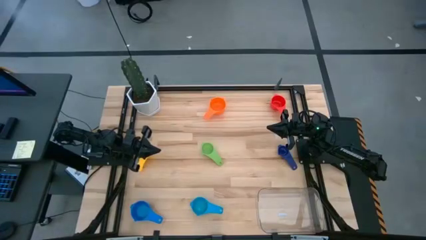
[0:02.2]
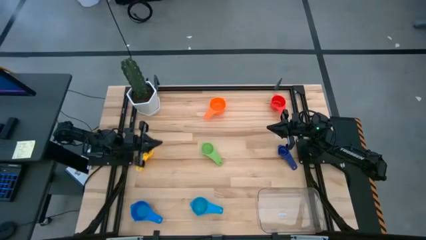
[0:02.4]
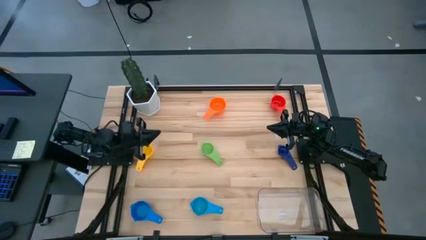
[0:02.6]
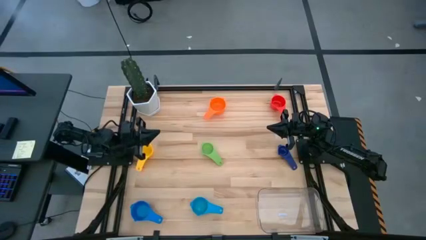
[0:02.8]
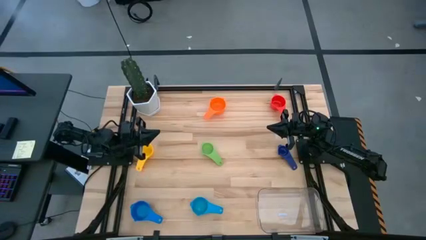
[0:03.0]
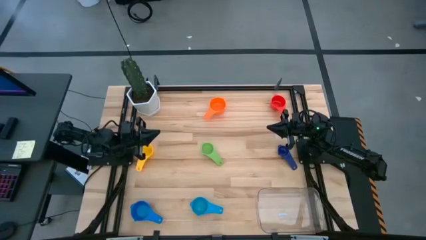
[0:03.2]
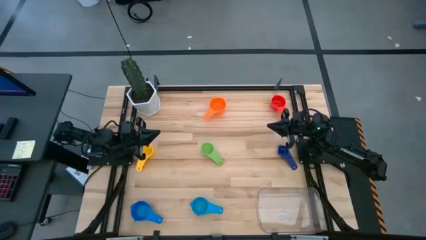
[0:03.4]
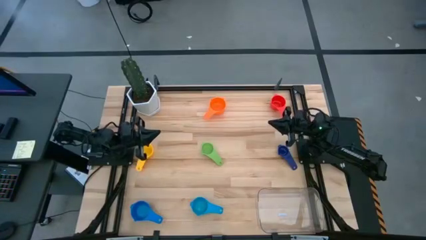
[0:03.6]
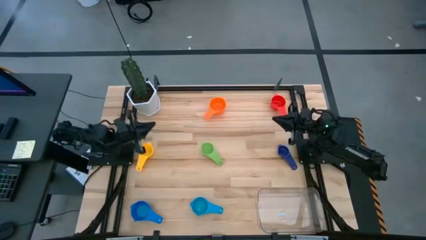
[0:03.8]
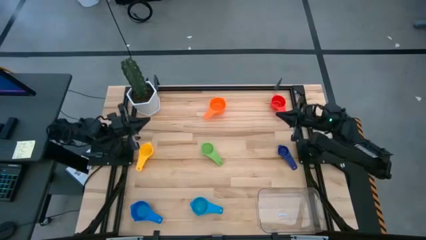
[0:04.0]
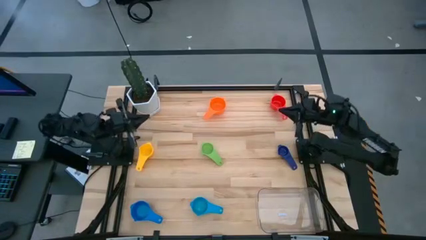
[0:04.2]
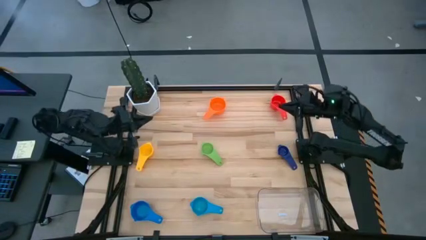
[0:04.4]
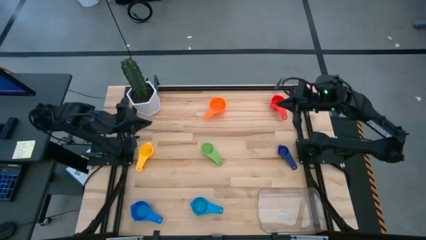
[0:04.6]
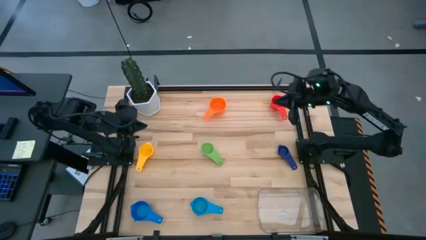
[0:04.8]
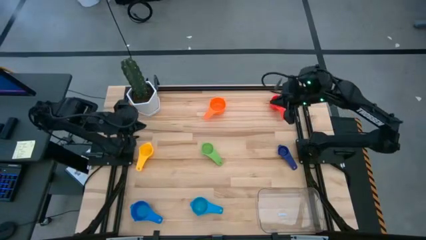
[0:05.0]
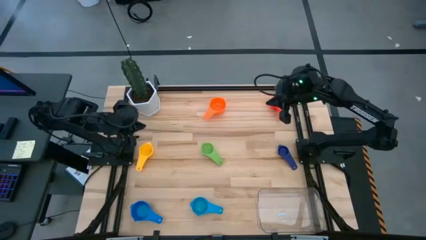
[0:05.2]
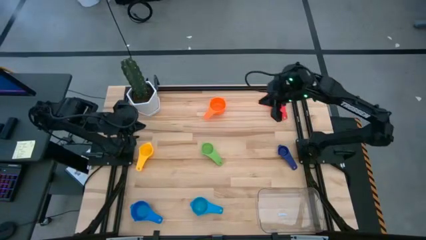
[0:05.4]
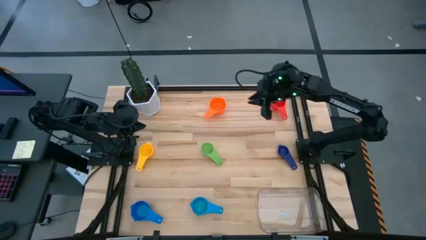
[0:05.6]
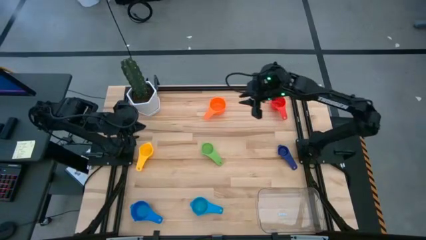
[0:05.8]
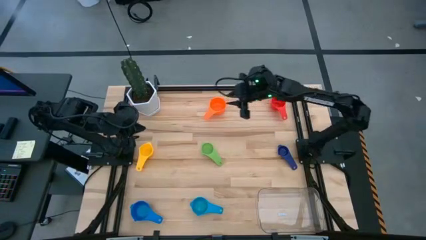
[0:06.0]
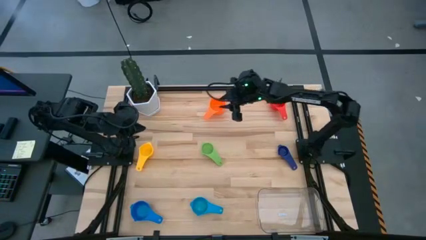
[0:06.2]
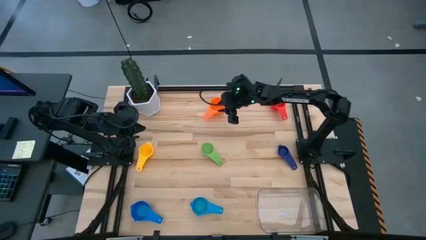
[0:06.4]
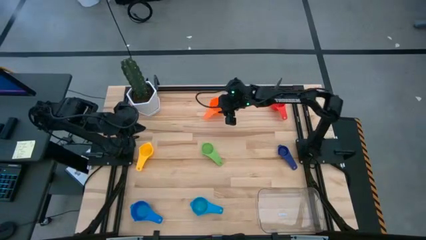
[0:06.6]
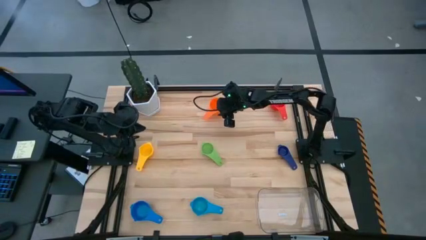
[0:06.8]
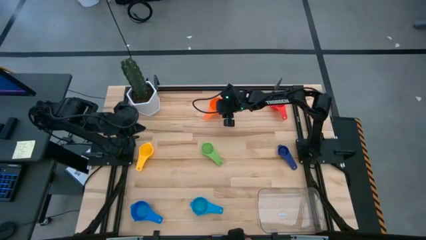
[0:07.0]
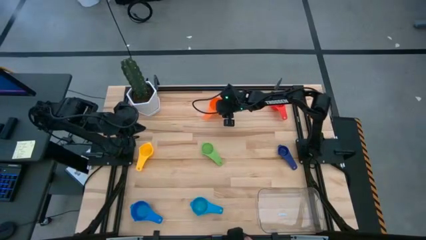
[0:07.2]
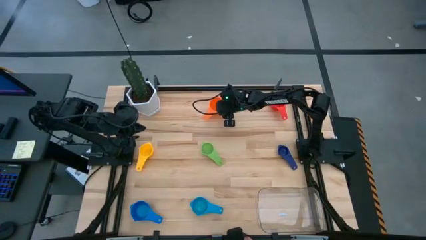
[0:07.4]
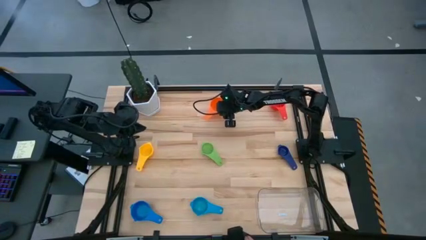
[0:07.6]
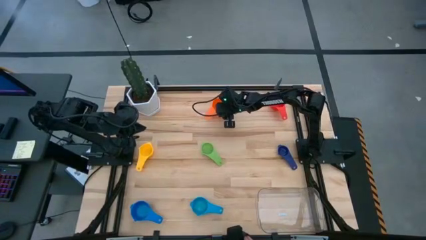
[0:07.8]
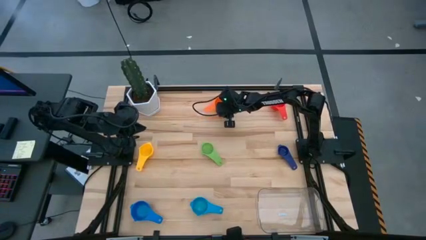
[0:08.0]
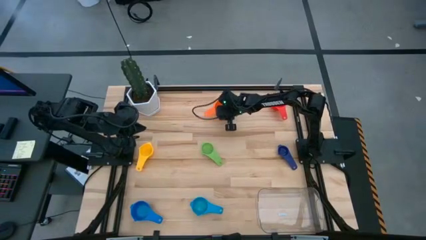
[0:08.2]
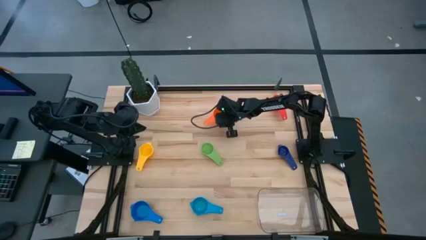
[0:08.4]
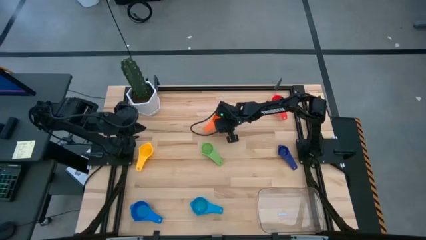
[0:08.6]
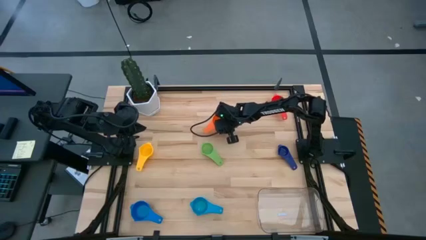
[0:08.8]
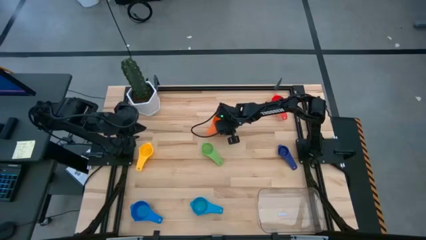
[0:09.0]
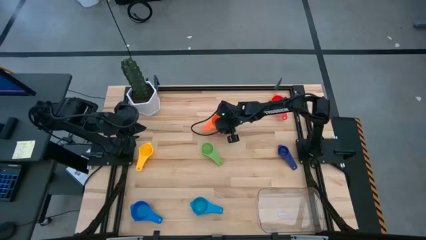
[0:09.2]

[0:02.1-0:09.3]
Task: Nest measuring cups in basket
Adjust the orange measuring cup

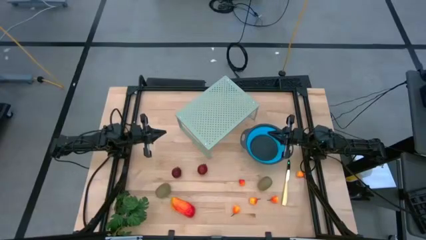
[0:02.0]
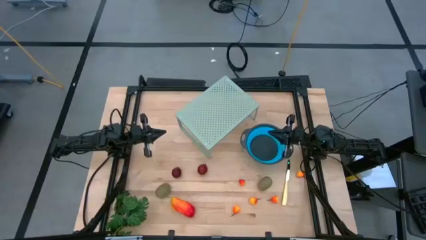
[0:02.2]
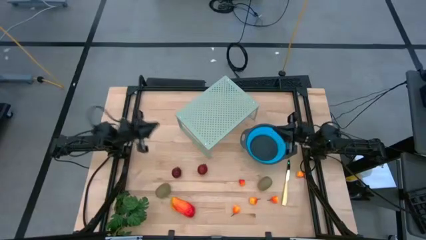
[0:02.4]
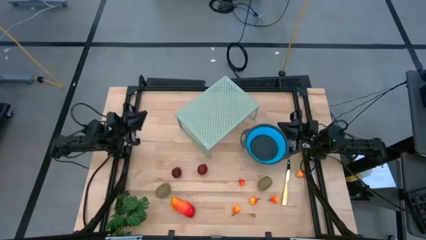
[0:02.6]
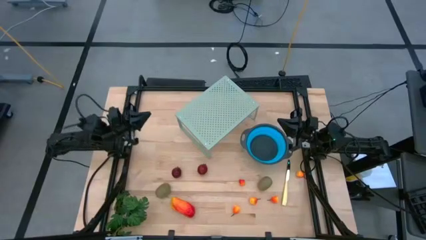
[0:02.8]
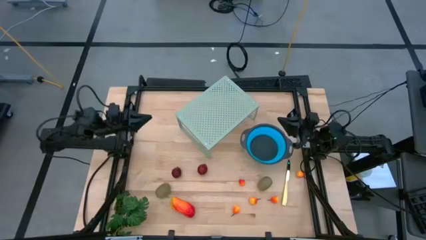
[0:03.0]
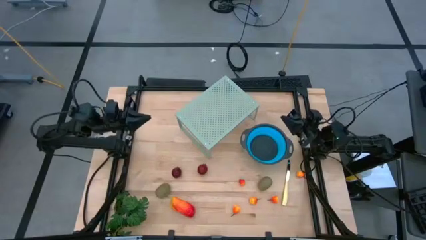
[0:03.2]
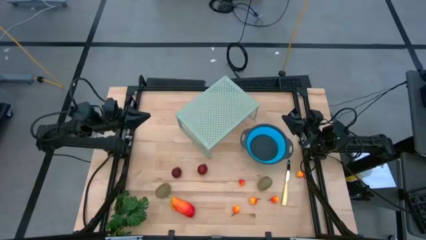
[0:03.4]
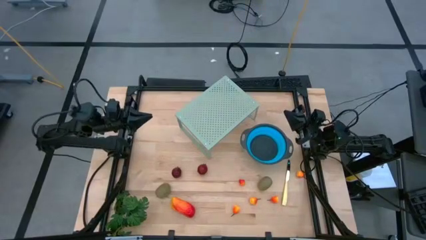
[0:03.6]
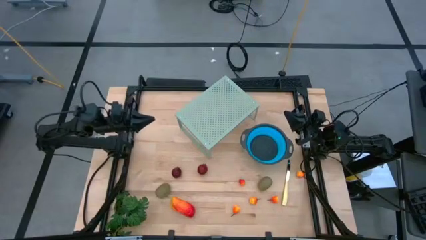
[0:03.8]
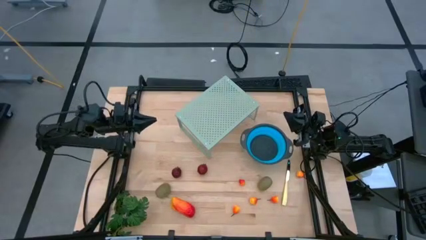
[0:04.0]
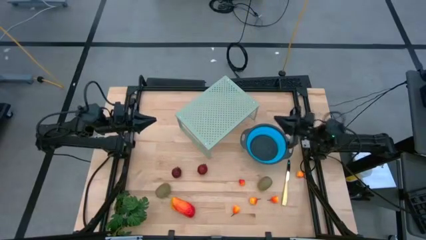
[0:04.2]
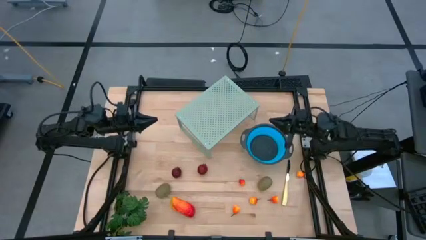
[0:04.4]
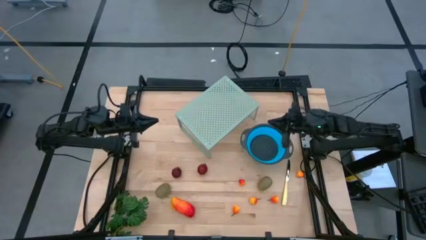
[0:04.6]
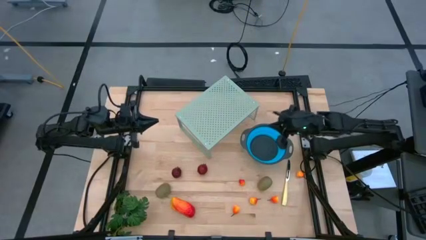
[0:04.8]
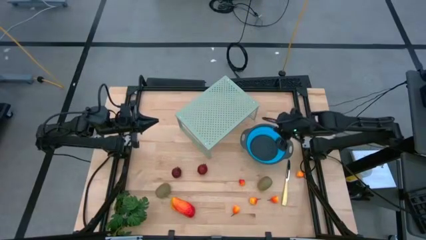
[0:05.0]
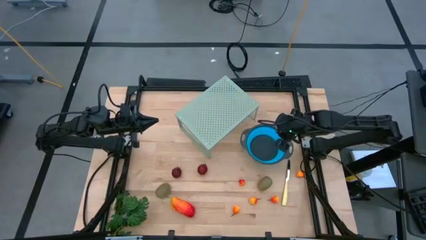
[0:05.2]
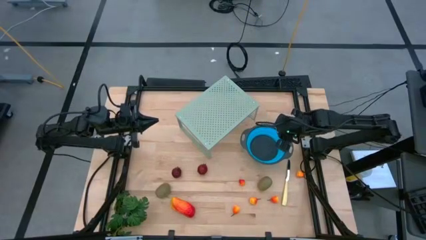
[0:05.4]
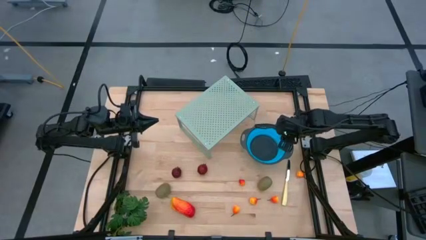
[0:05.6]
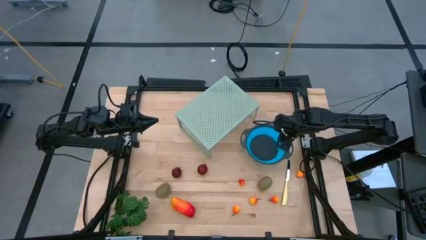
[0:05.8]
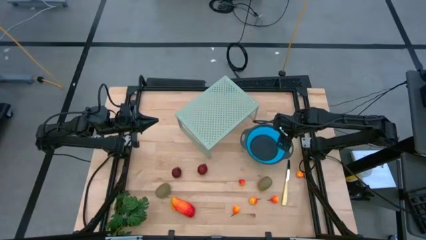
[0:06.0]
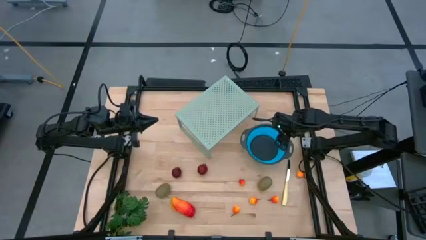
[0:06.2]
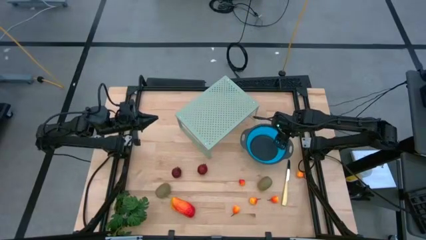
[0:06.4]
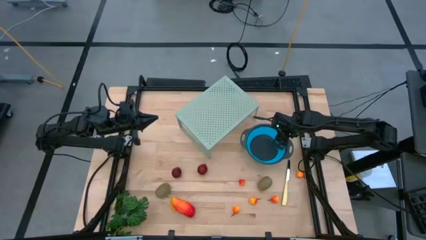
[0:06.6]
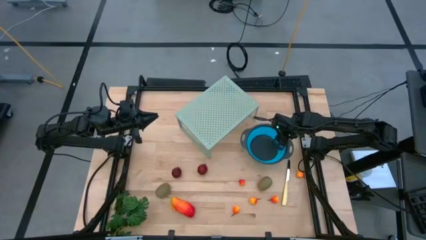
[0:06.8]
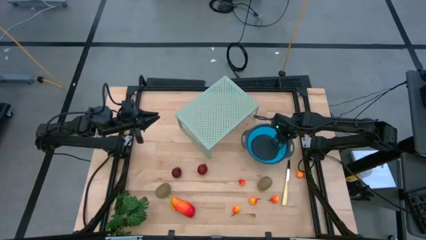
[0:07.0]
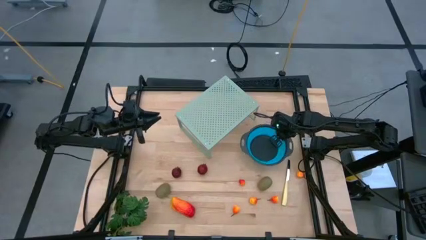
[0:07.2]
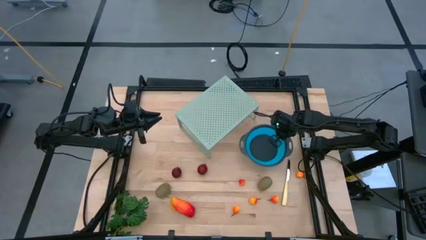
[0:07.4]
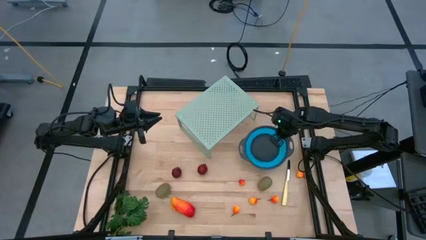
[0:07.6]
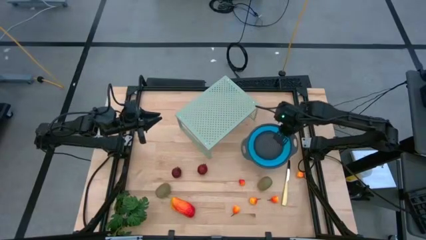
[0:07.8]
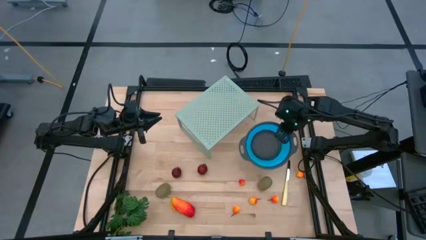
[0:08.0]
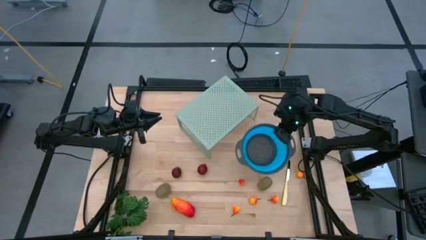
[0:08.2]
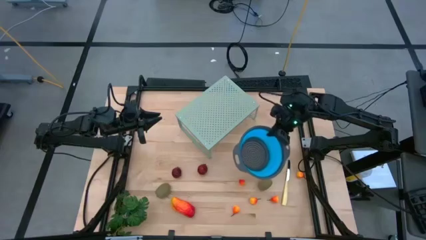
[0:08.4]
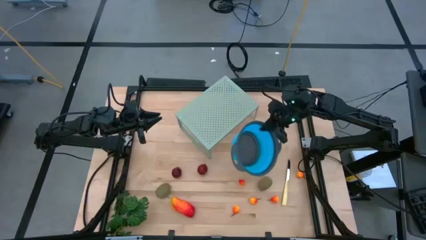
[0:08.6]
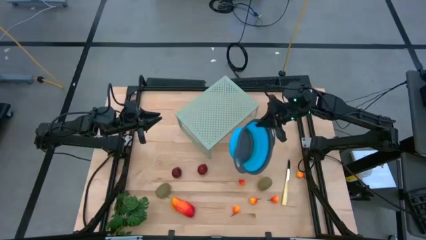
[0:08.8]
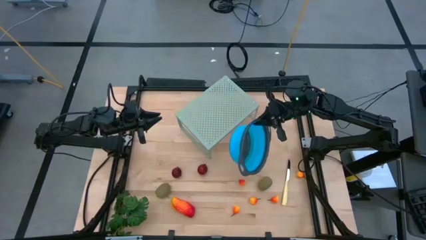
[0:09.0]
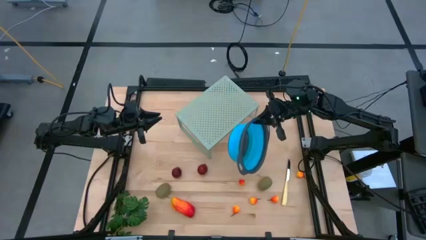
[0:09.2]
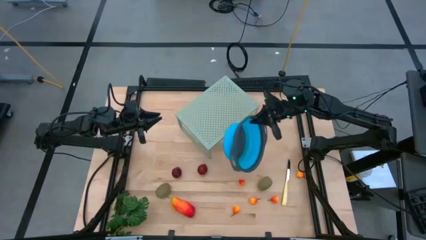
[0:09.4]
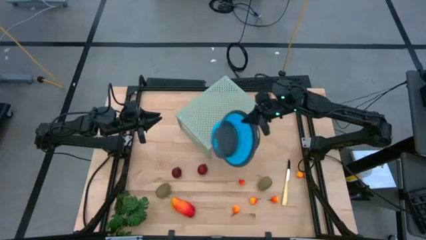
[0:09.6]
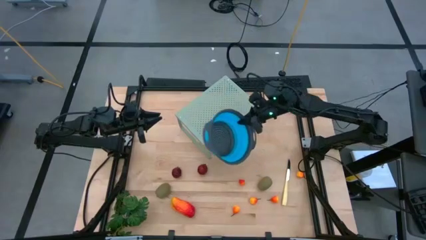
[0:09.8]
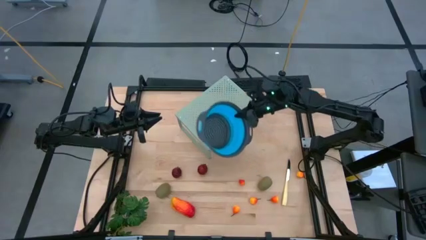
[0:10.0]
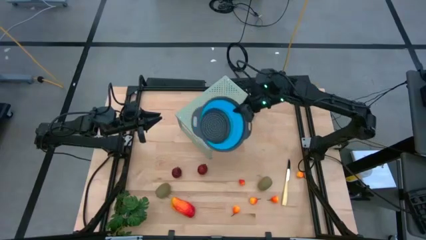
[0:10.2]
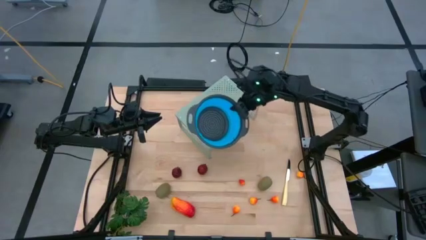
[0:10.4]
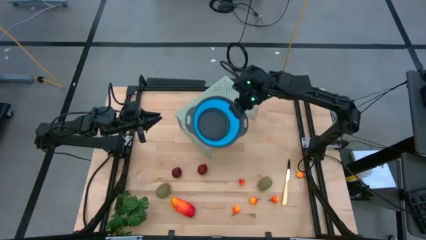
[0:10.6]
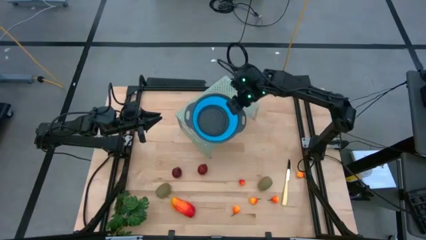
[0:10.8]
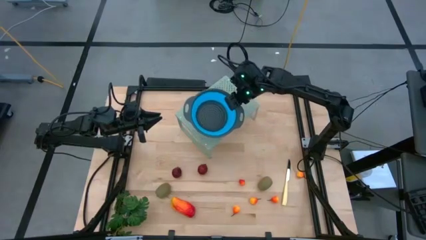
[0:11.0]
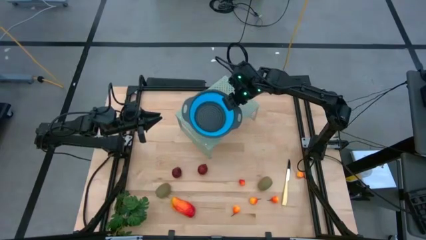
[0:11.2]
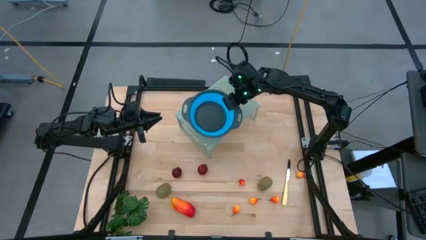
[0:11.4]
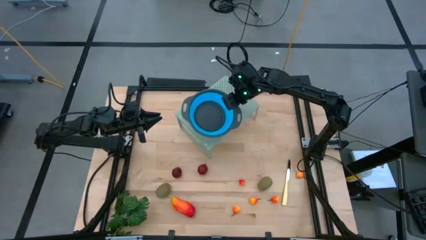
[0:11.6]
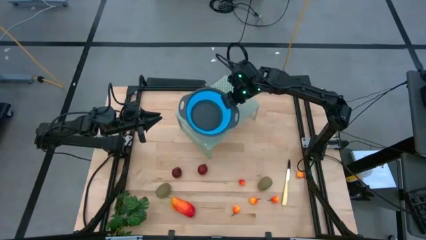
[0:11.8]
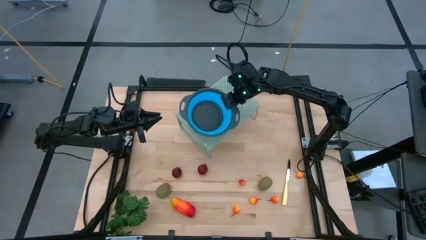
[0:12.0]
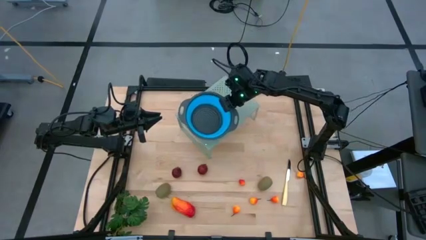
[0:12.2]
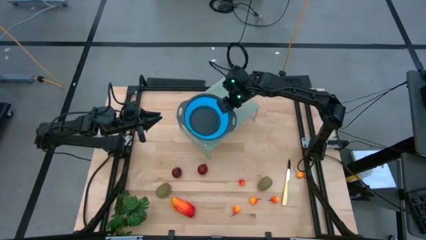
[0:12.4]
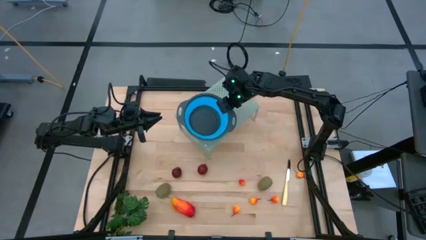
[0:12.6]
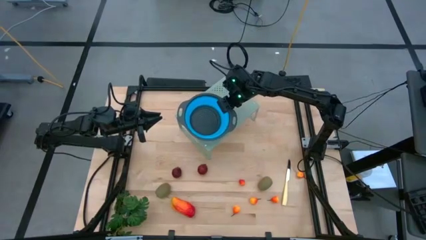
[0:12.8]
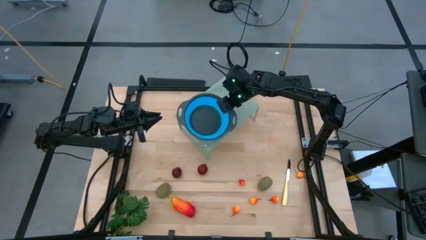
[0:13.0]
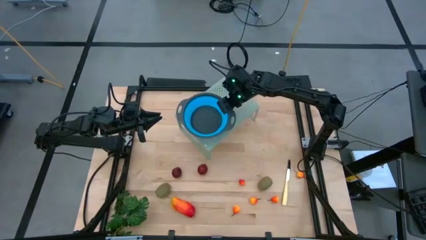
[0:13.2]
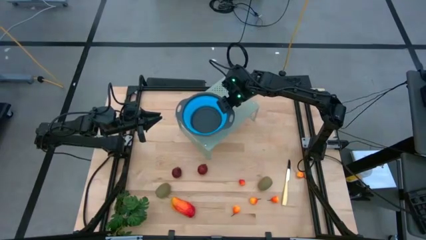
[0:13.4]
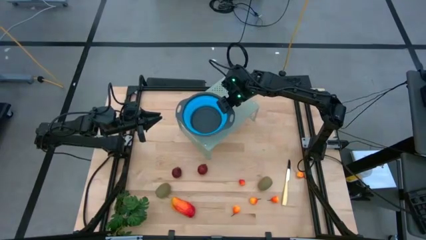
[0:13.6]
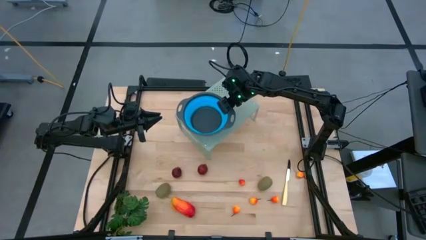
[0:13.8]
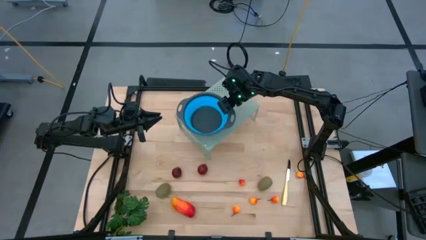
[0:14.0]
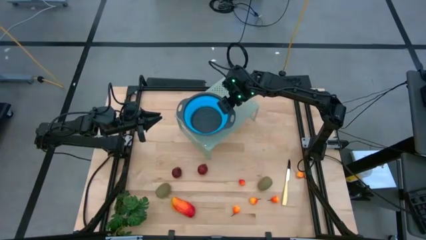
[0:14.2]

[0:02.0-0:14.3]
Task: Pick & Place Fruit
Put the collapsible colander on the shelf
